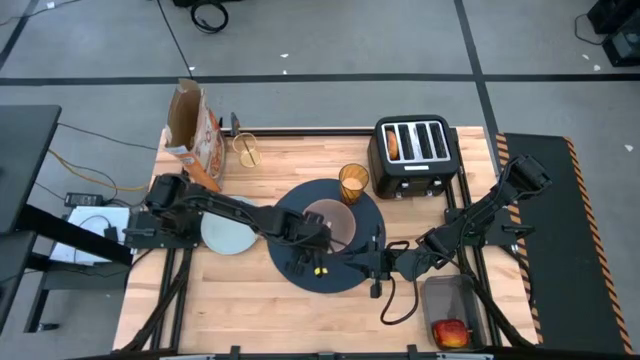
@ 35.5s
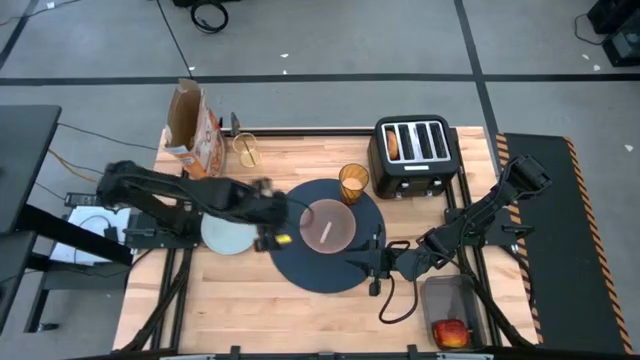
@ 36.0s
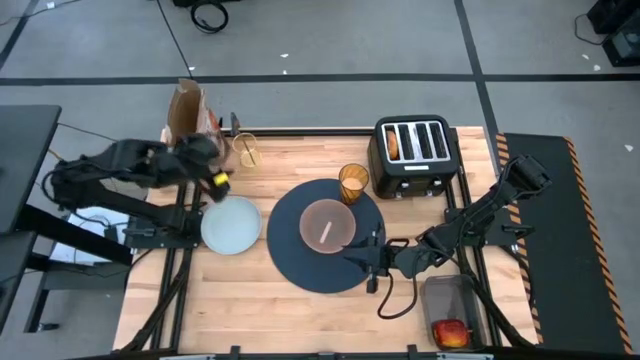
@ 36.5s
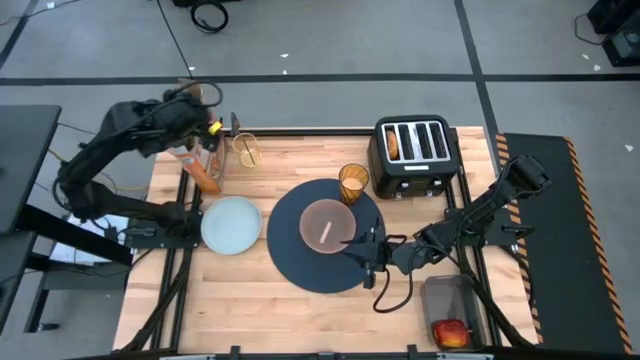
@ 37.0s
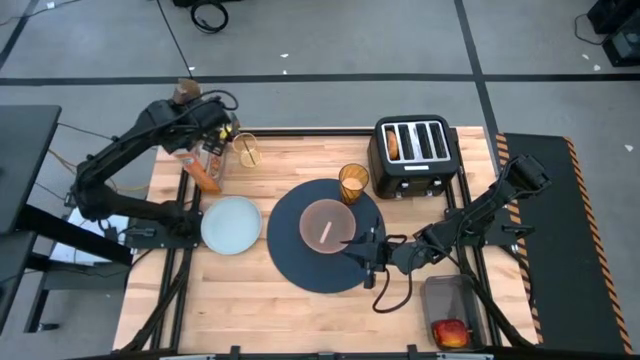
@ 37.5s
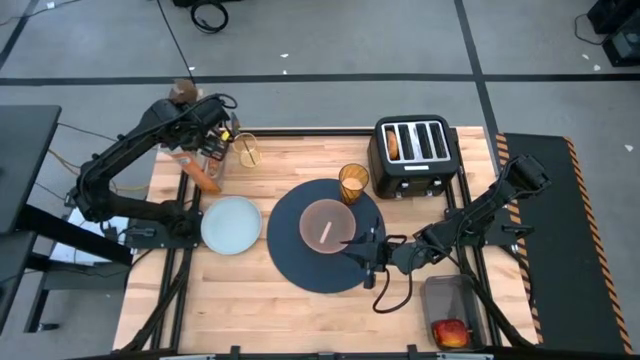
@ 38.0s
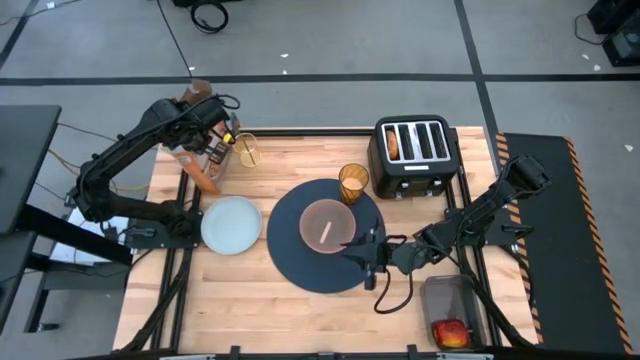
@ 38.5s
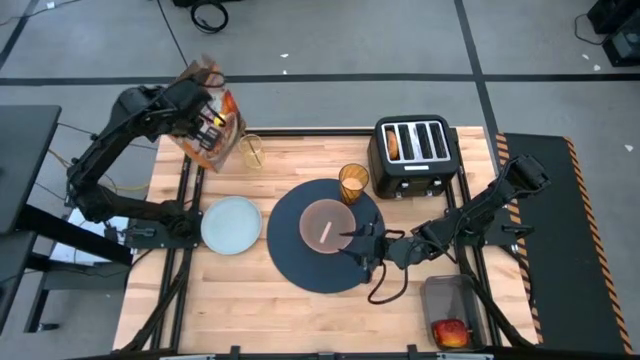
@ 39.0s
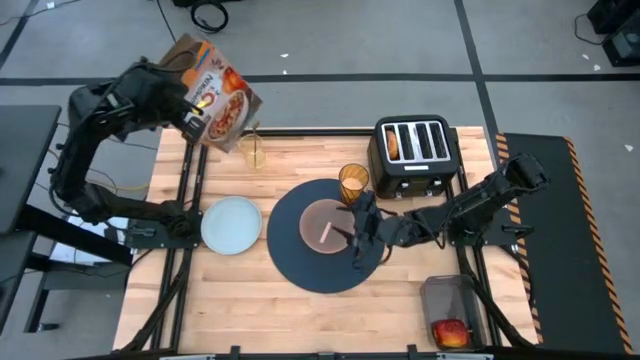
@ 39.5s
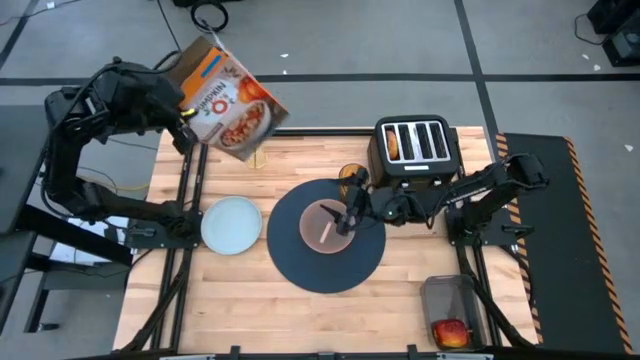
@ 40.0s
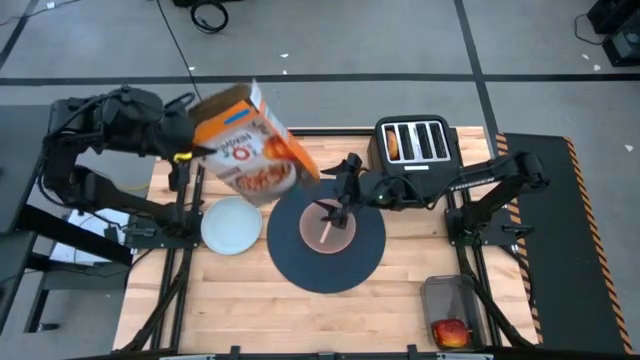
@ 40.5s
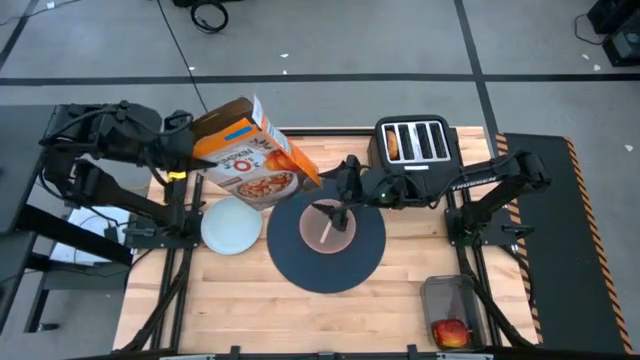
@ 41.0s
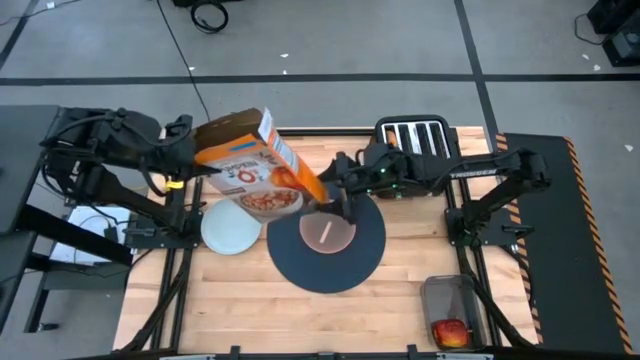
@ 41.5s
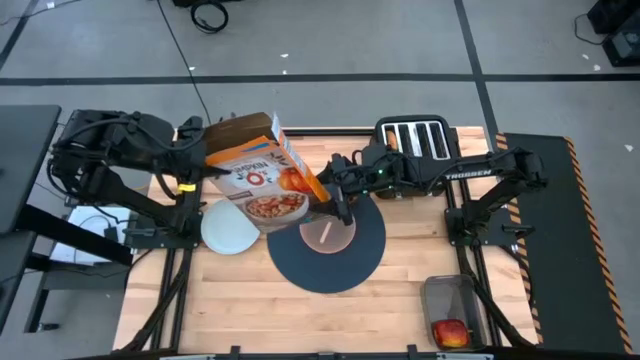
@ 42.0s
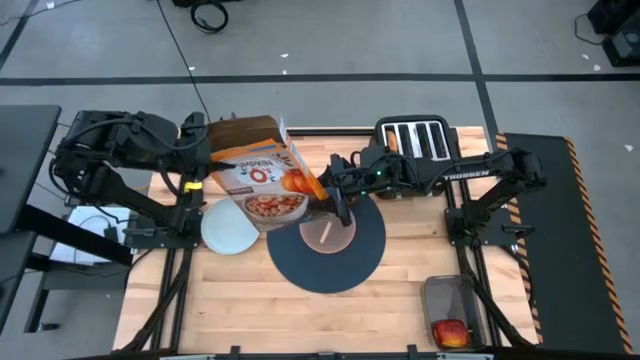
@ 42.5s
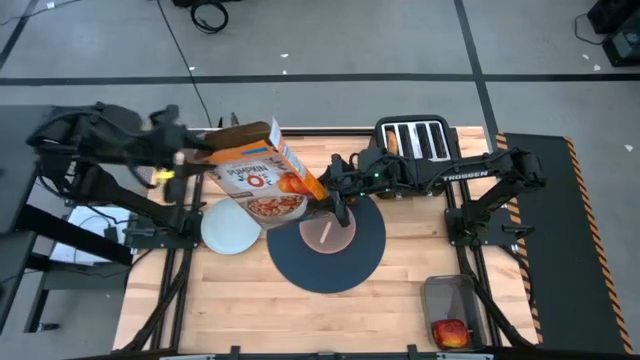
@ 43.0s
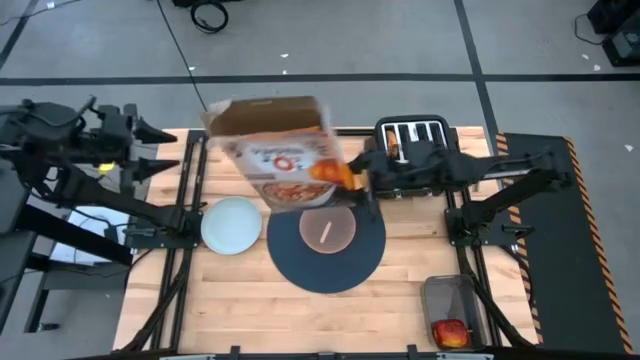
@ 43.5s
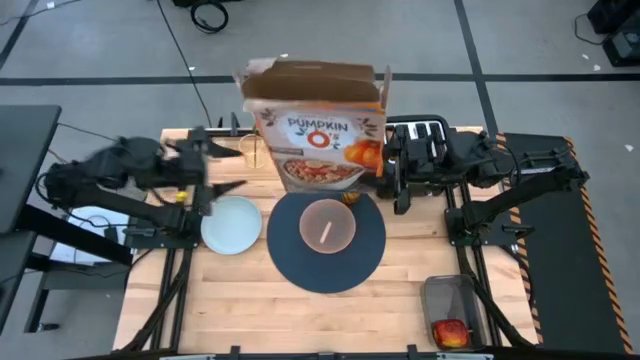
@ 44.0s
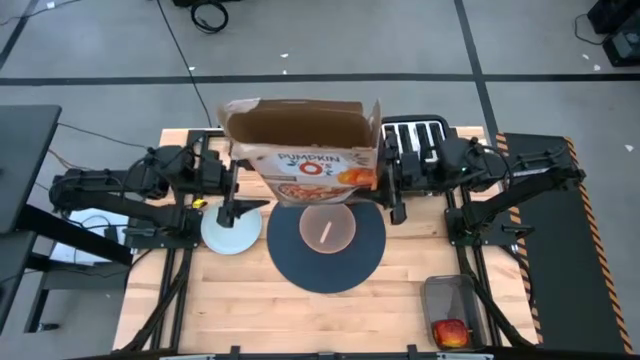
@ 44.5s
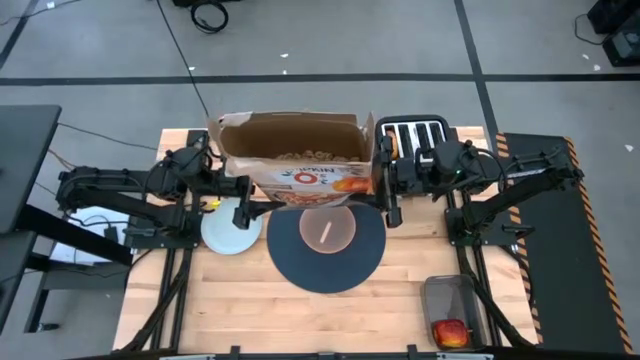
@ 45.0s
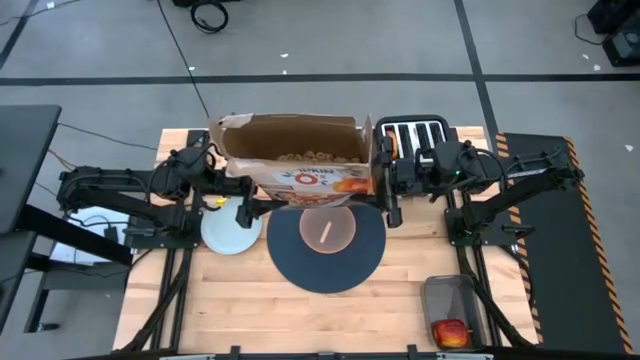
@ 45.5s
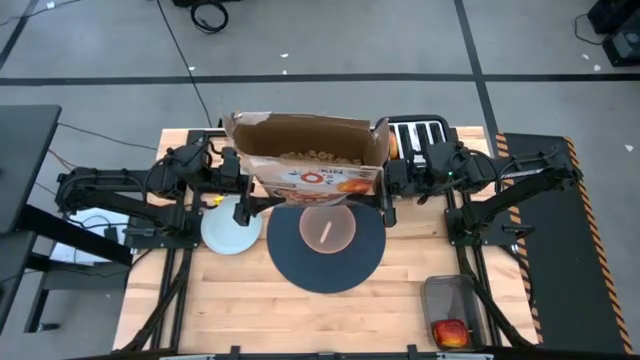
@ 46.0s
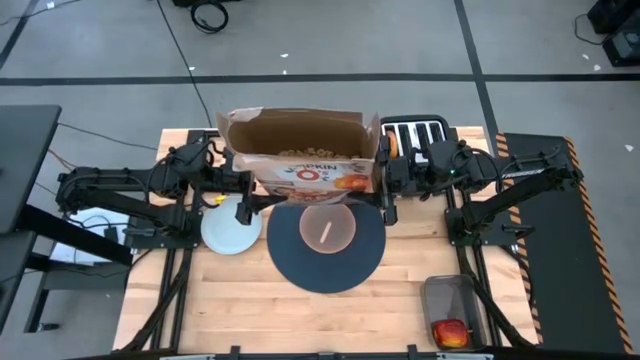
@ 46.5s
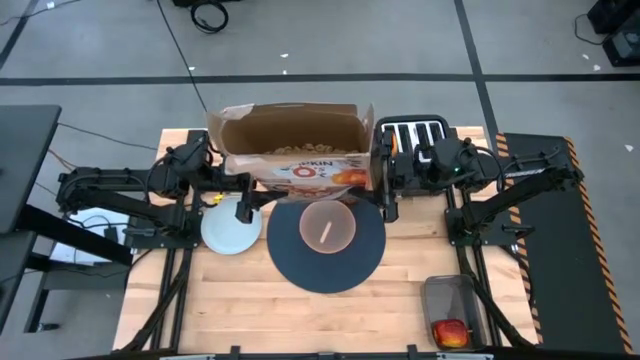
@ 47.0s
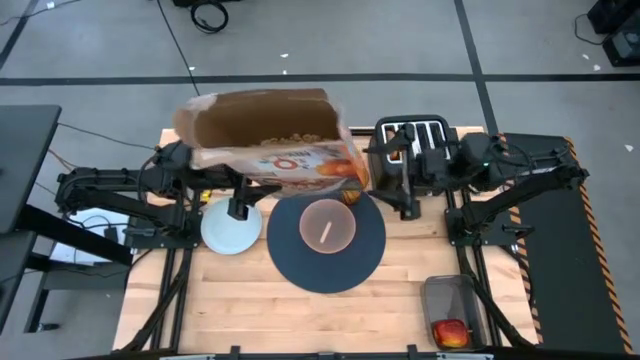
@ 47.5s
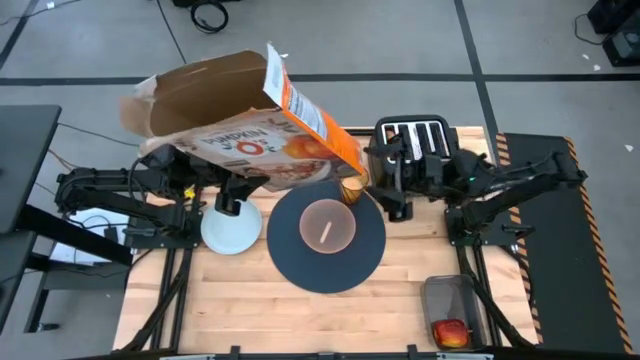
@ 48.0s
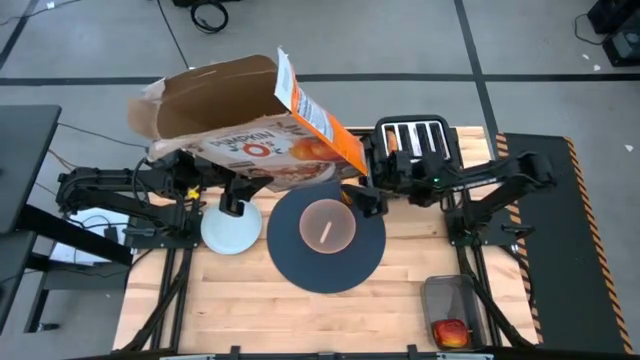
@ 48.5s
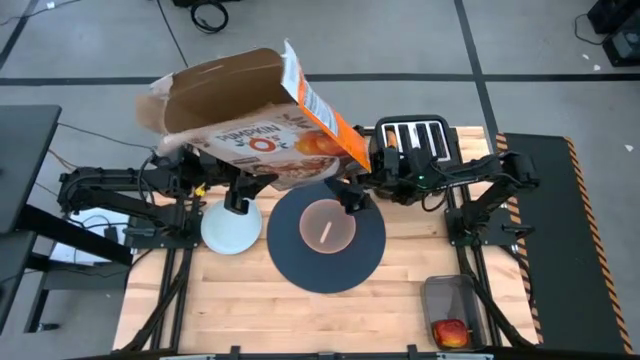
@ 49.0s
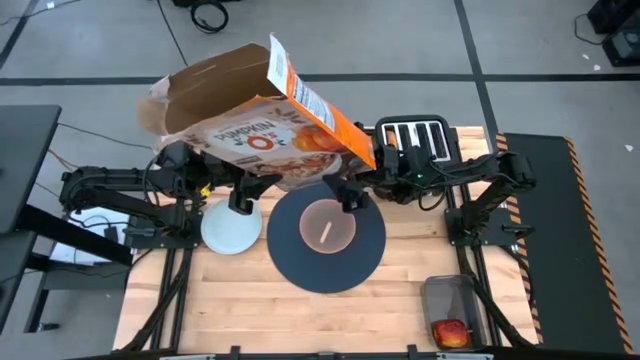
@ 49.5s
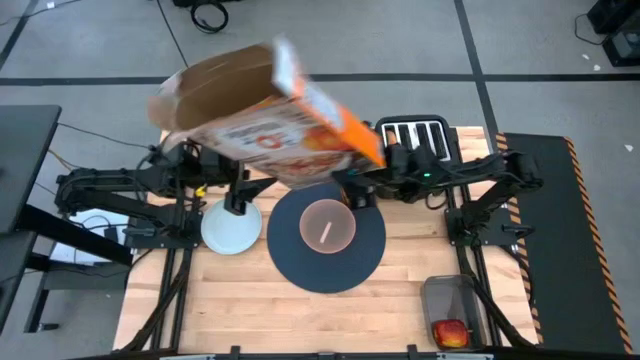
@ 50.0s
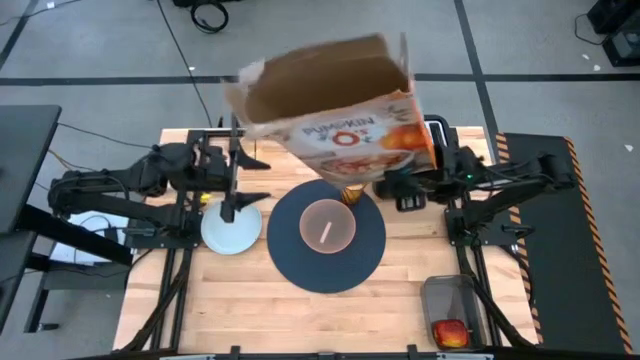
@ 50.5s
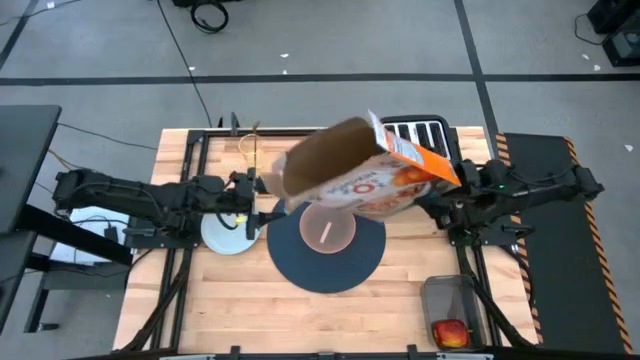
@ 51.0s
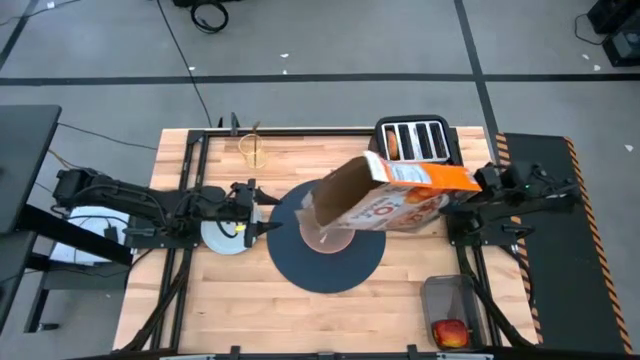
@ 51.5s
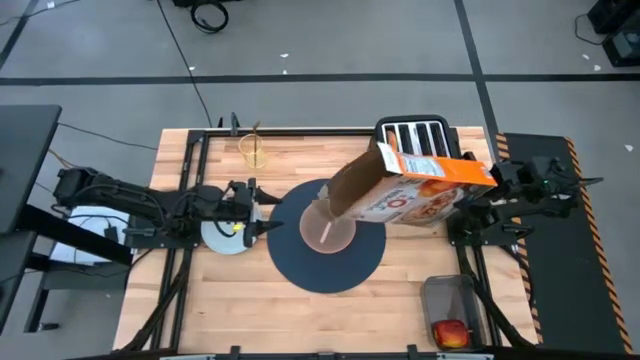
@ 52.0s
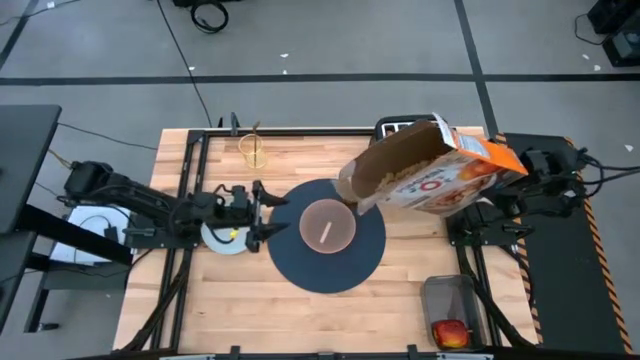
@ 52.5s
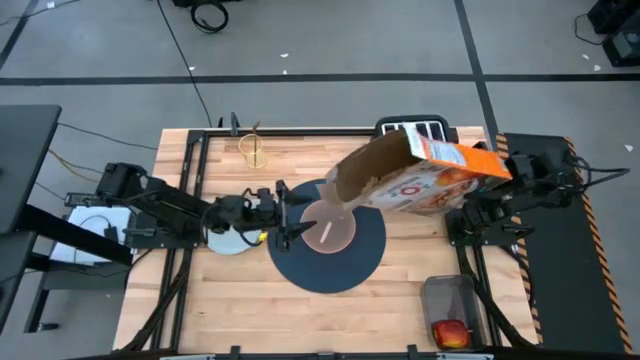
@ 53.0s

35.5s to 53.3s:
Task: Arrange a breakfast setting
Pour the cereal from the orange cereal box into the light orange bowl

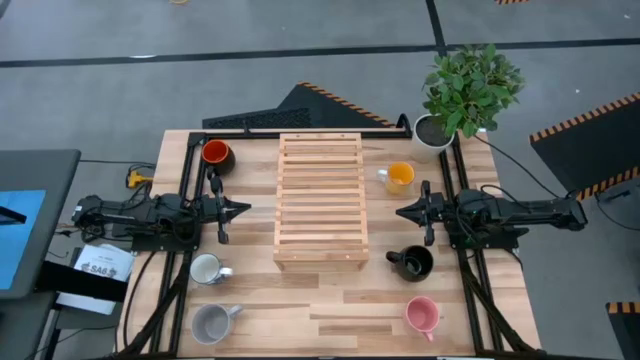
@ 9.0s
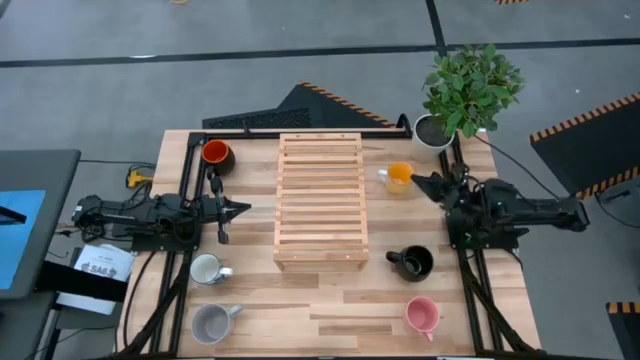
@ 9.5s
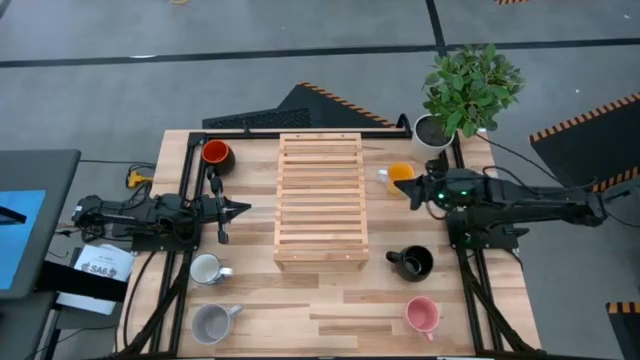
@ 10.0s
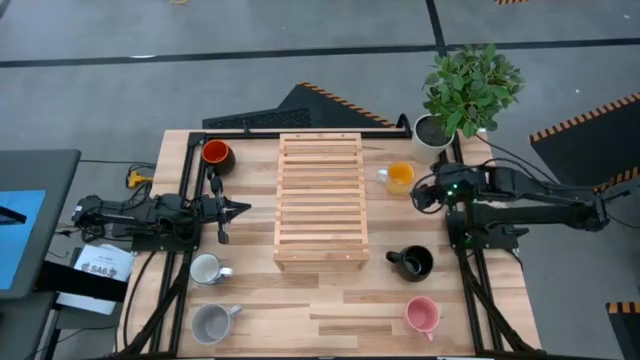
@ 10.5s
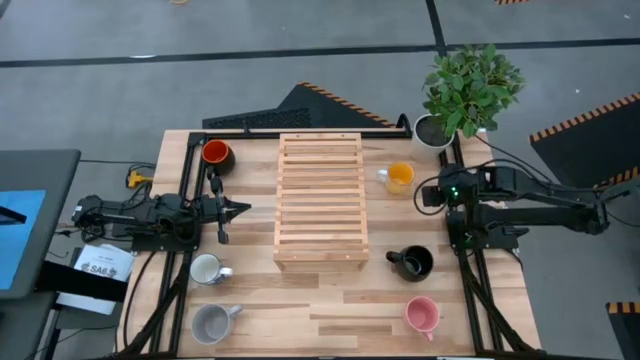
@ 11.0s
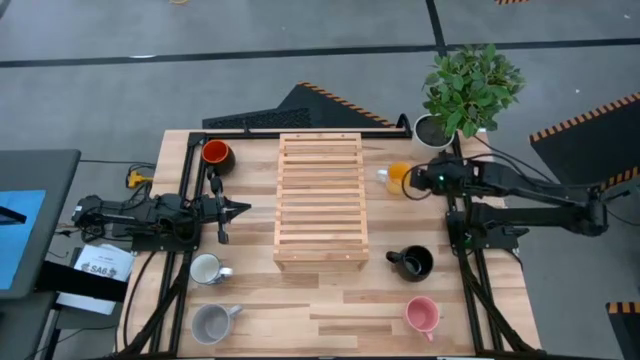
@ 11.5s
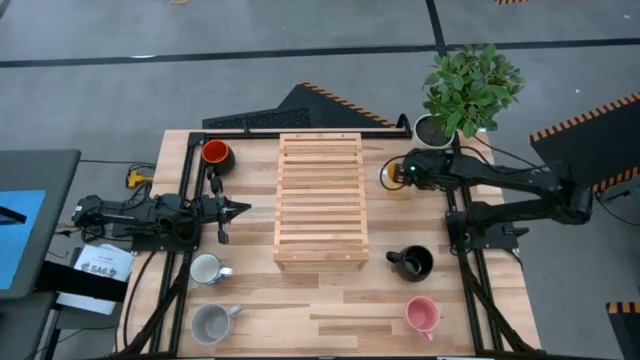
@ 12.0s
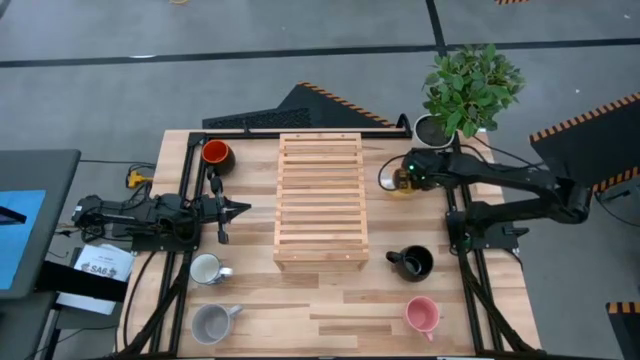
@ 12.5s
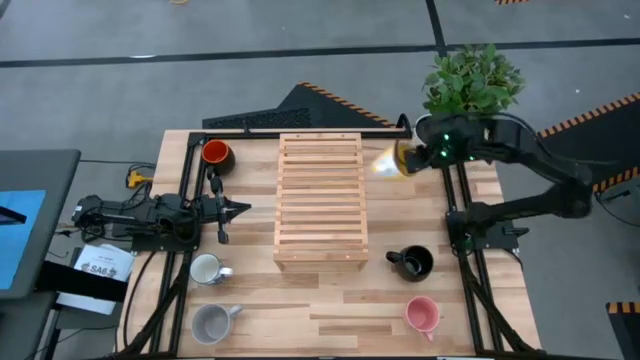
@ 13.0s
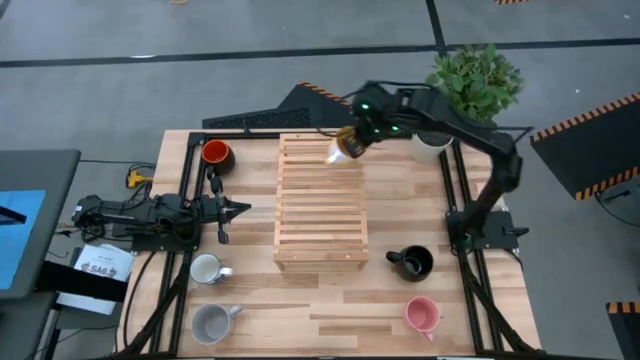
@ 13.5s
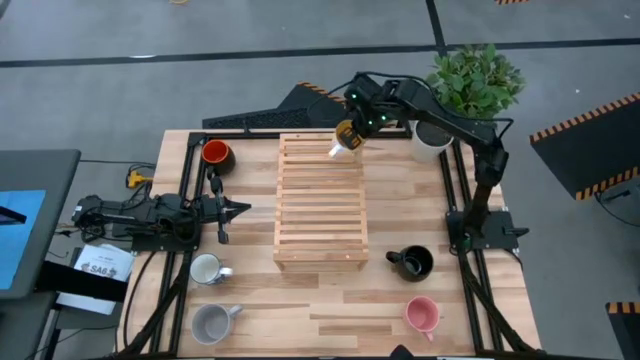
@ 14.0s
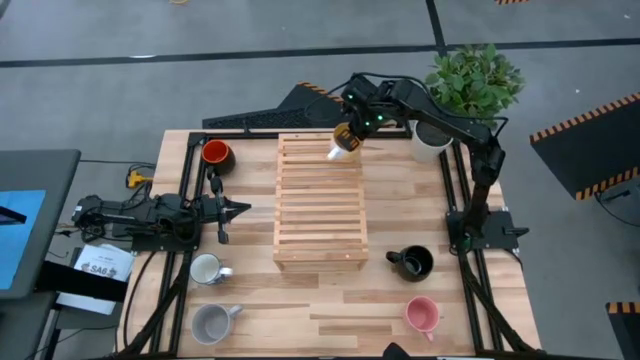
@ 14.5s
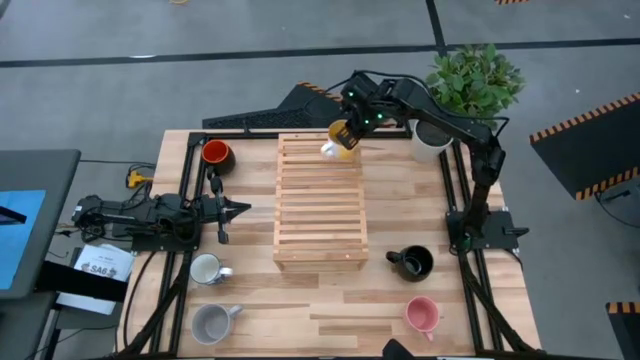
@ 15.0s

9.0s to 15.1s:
Task: Place coffee mugs
Put the yellow mug on the shelf
